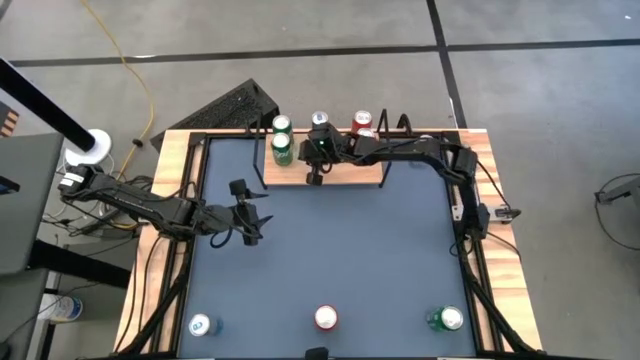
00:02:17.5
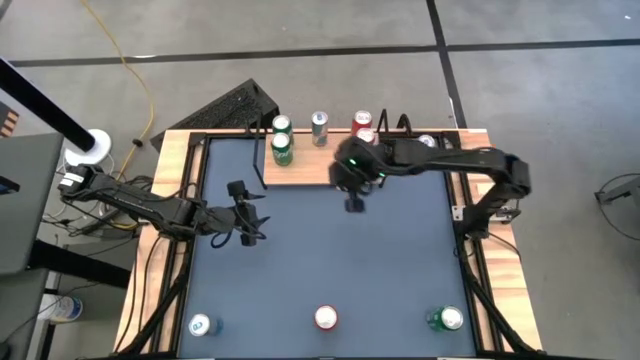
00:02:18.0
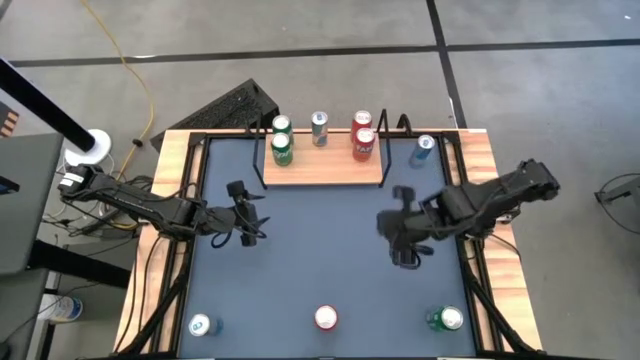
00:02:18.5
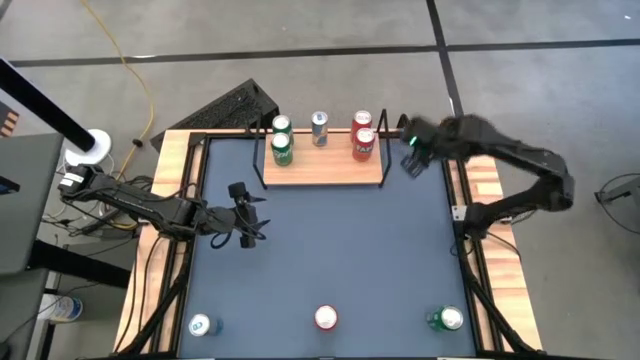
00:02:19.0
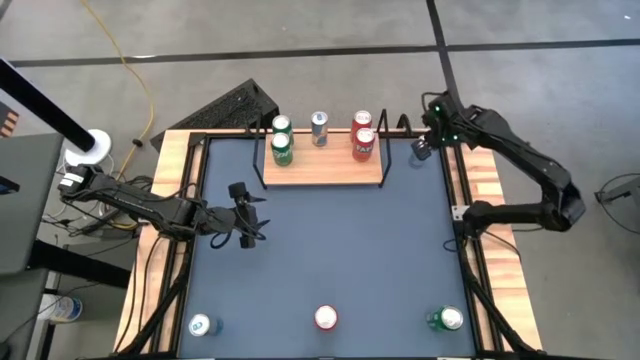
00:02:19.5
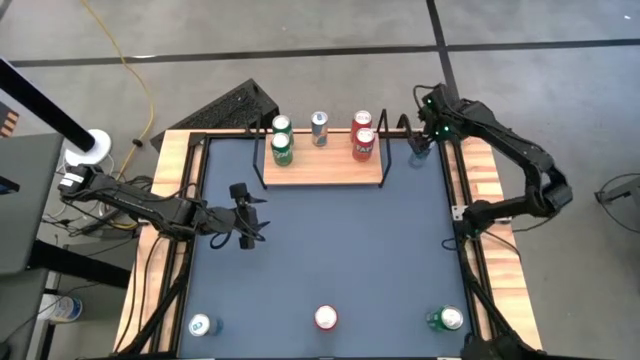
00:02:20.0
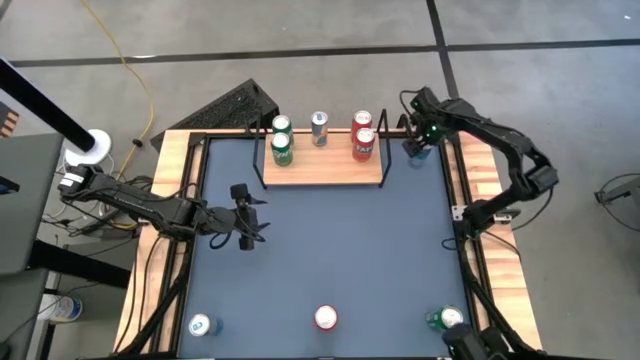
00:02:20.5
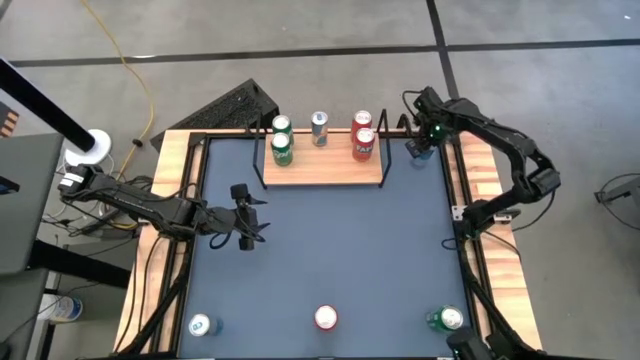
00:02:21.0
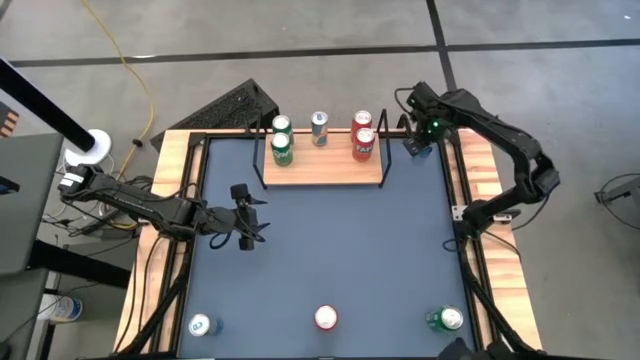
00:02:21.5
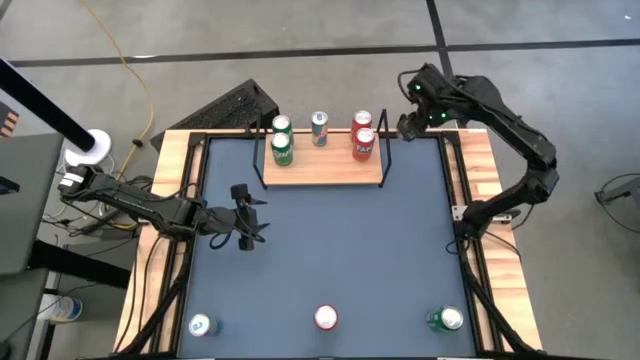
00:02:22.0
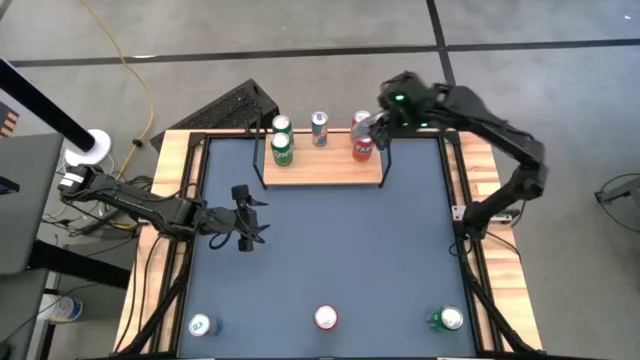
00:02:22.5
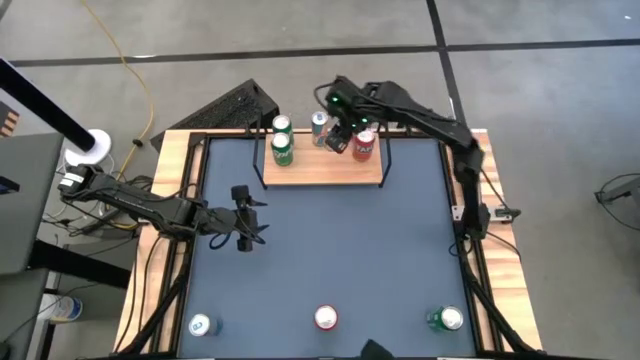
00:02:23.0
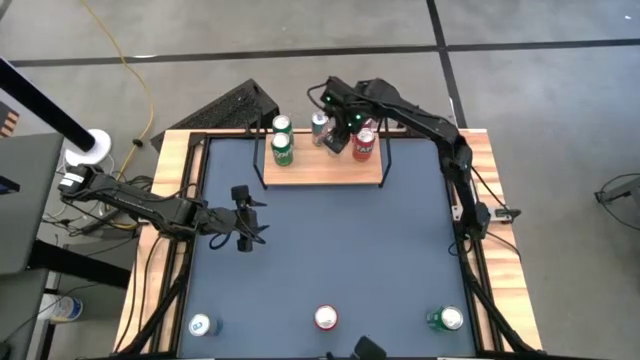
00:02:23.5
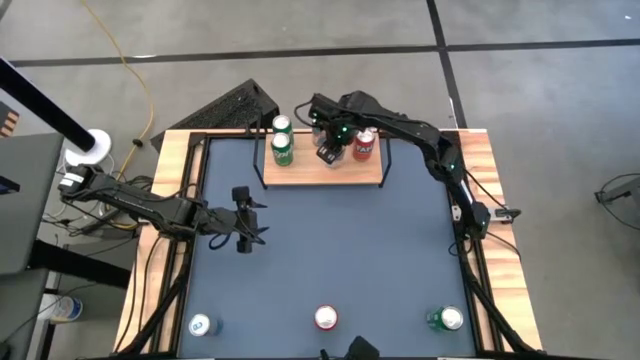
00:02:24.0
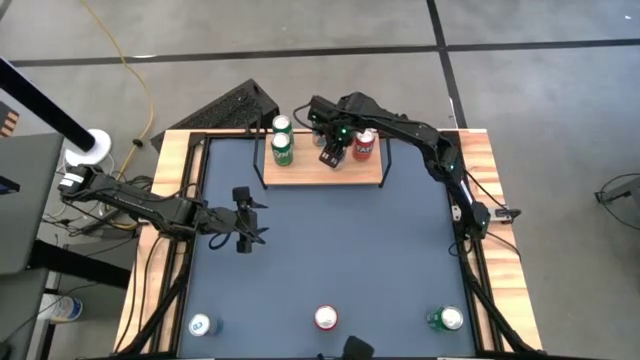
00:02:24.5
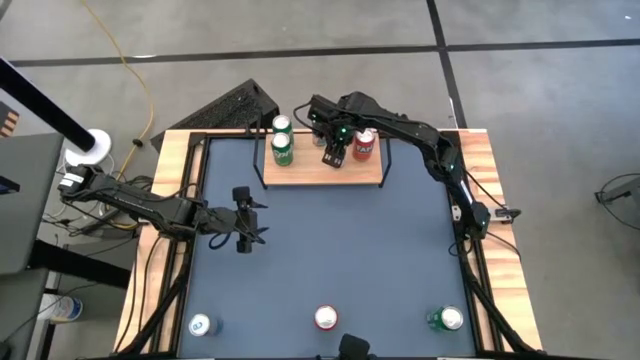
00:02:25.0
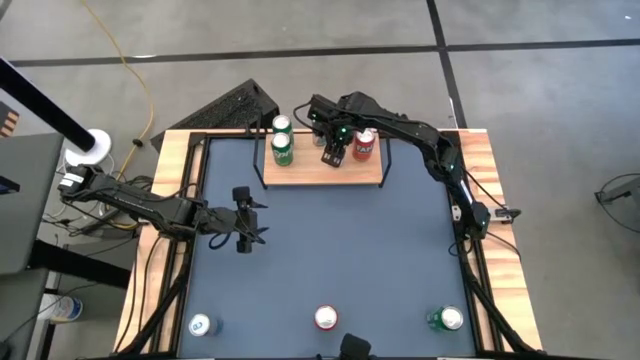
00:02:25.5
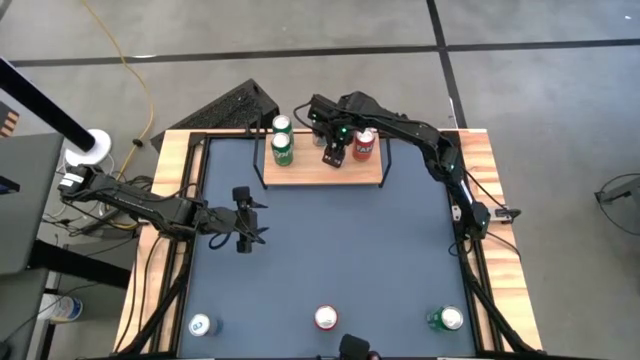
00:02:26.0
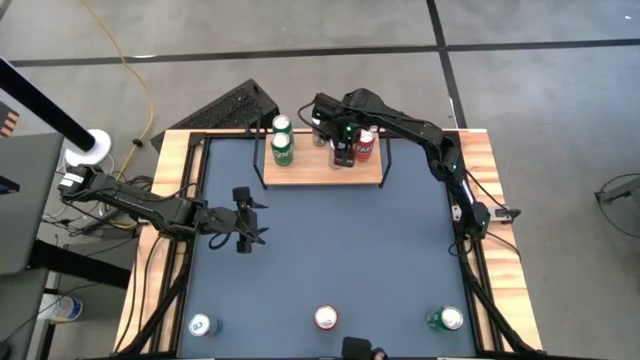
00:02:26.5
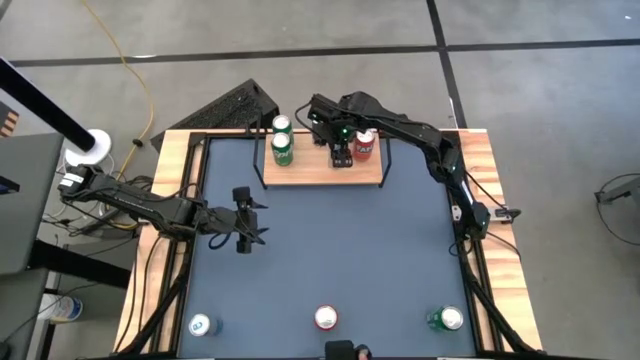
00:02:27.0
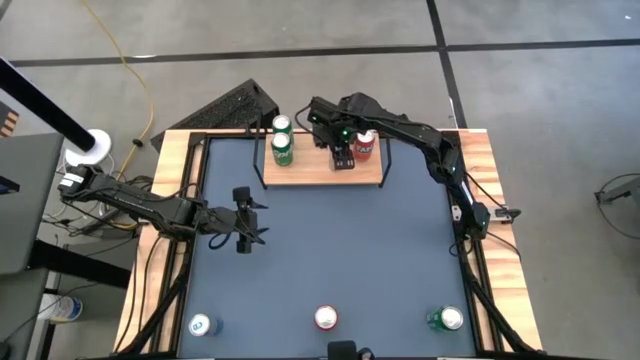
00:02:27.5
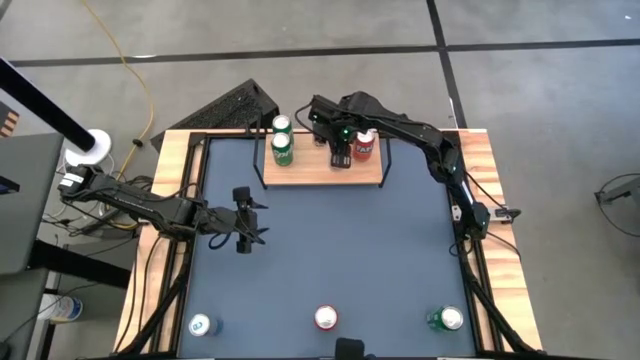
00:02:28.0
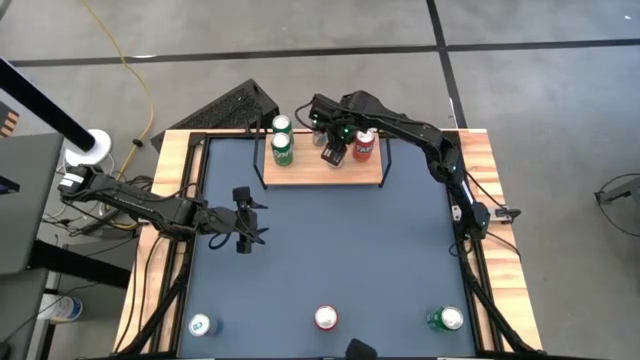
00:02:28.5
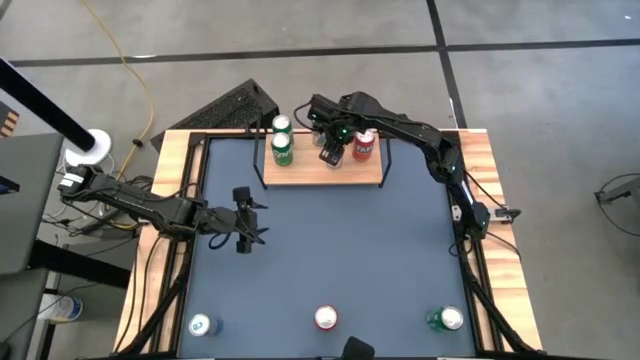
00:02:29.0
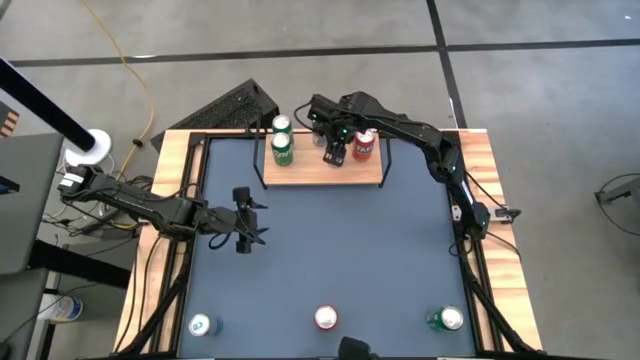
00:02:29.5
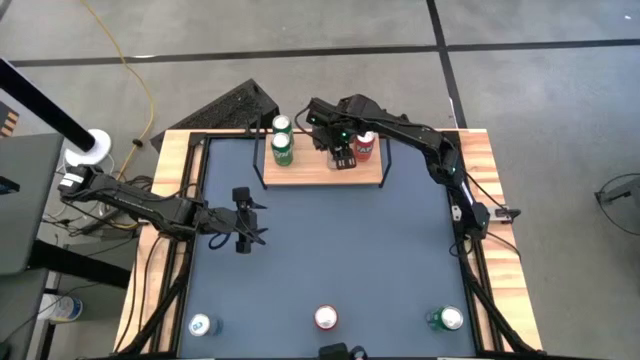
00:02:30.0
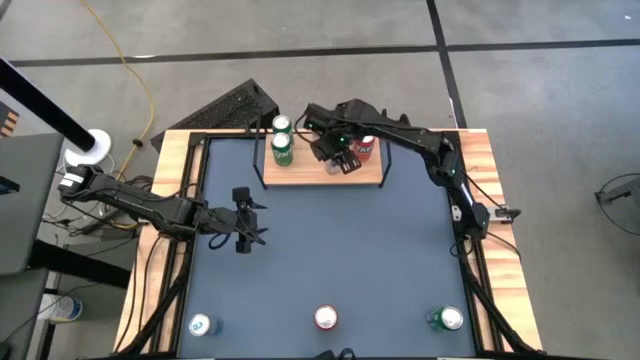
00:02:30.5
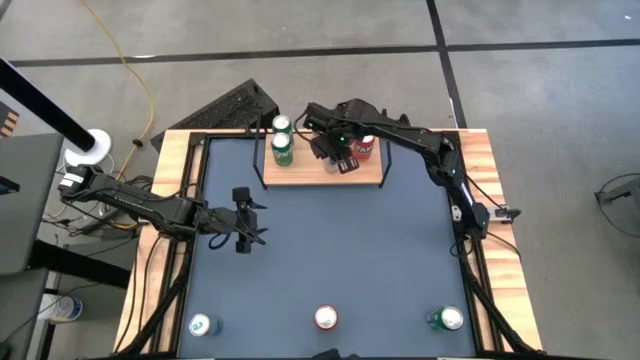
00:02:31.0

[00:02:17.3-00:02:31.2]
Task: Place canned beverage on shelf
Put the top blue soda can on the shelf aligned with the other blue soda can

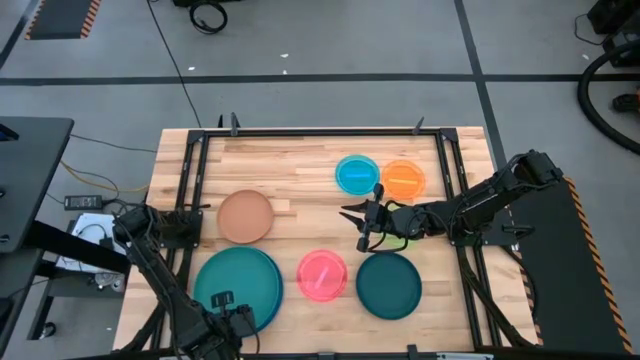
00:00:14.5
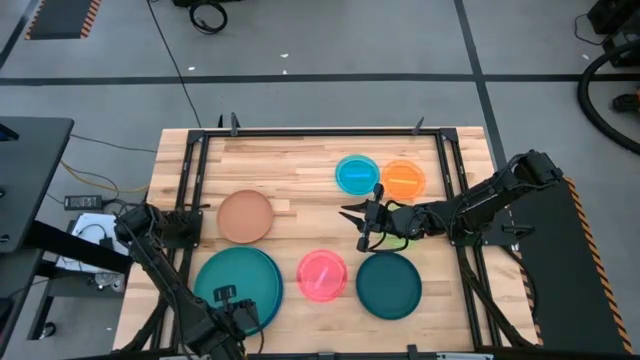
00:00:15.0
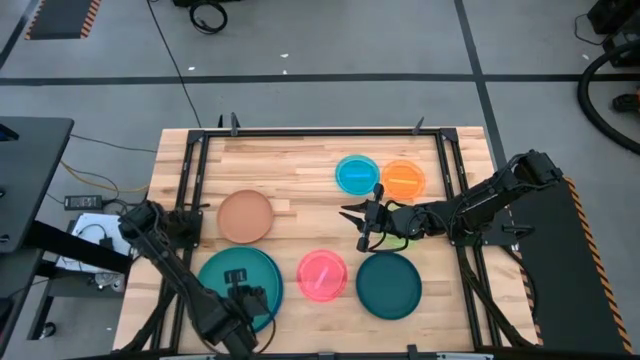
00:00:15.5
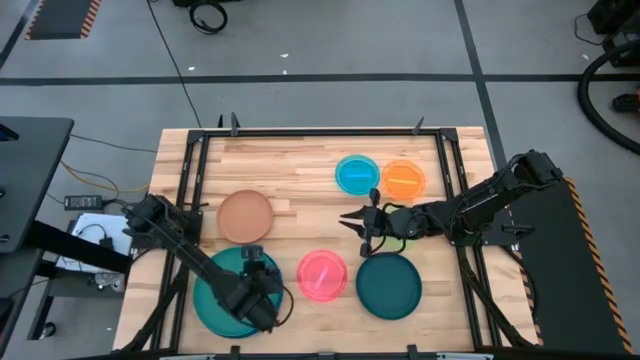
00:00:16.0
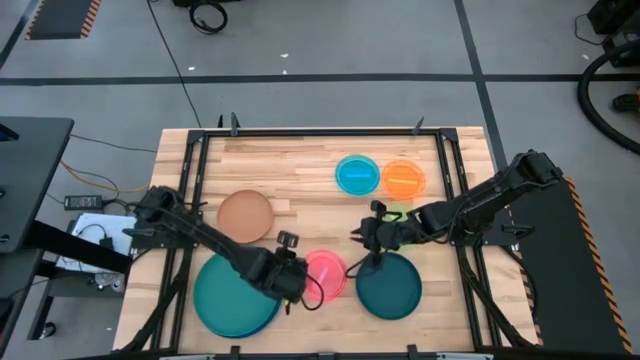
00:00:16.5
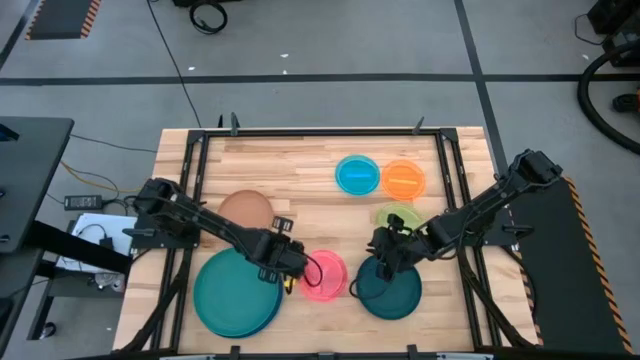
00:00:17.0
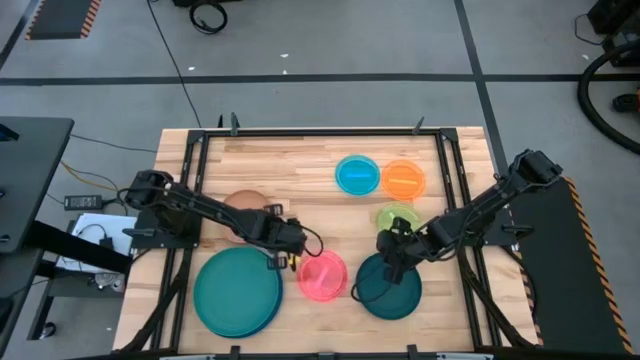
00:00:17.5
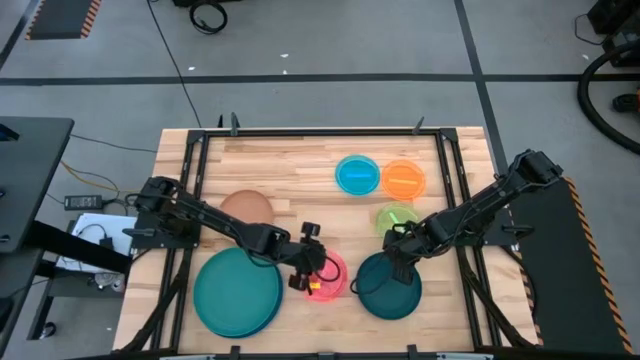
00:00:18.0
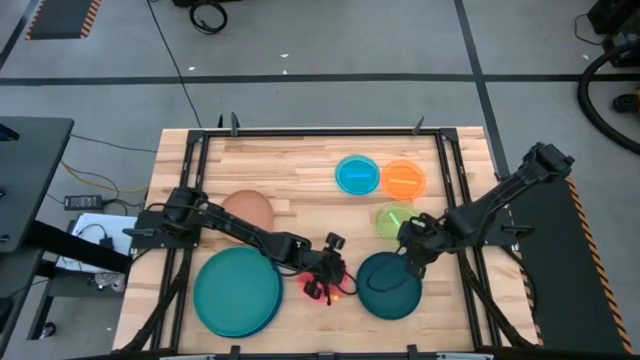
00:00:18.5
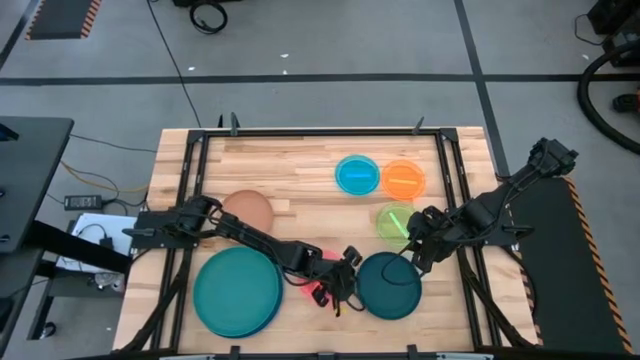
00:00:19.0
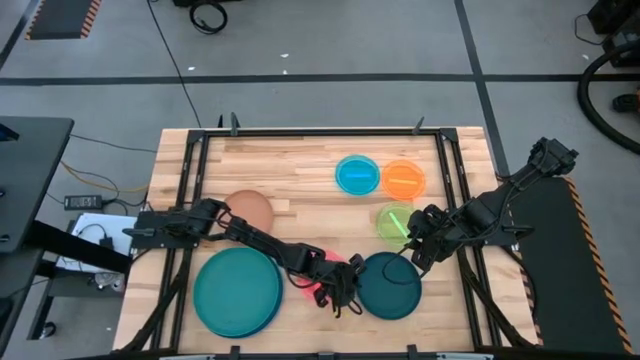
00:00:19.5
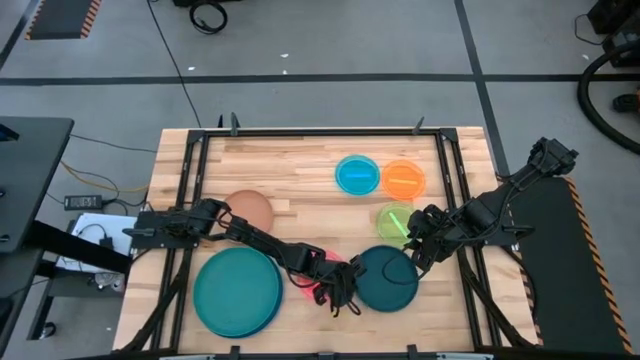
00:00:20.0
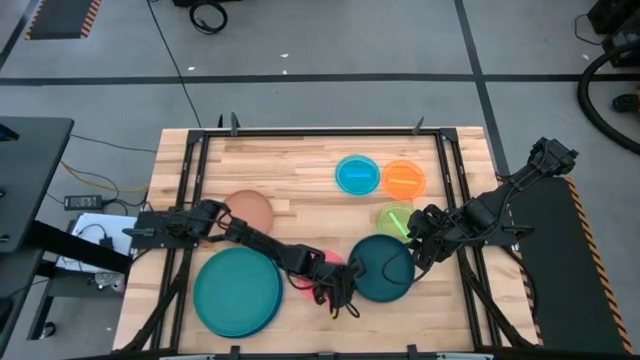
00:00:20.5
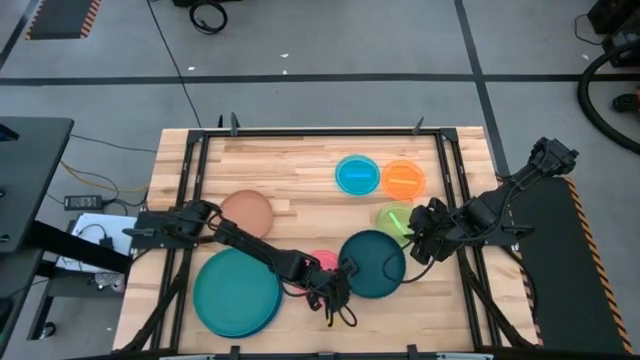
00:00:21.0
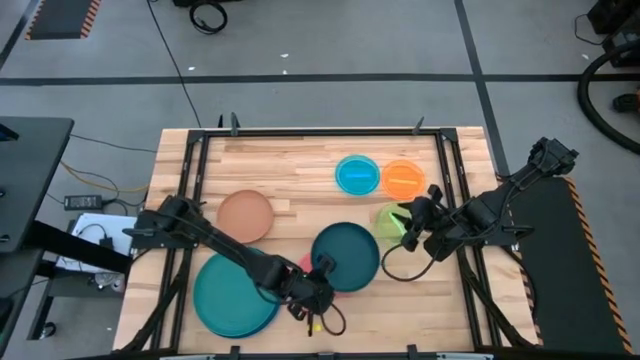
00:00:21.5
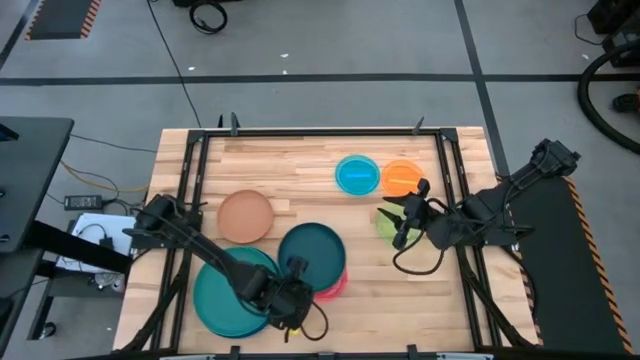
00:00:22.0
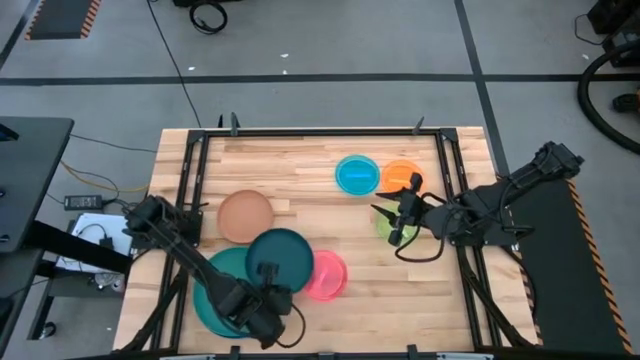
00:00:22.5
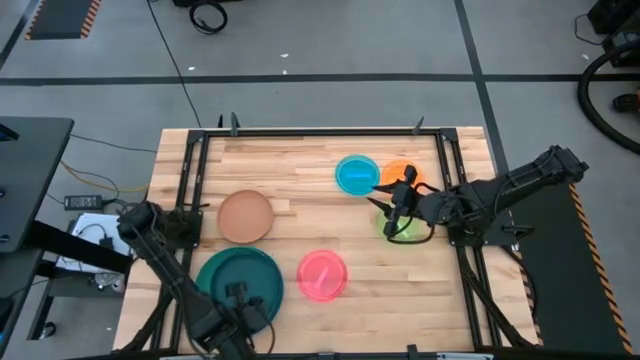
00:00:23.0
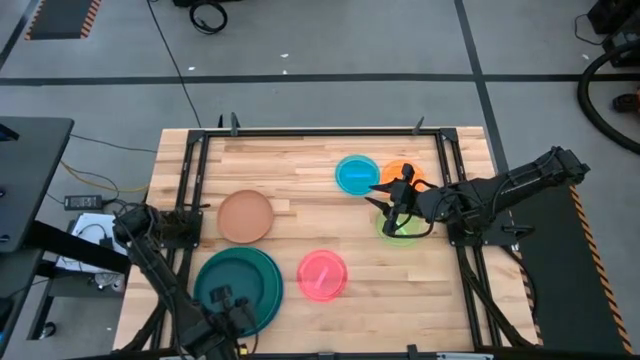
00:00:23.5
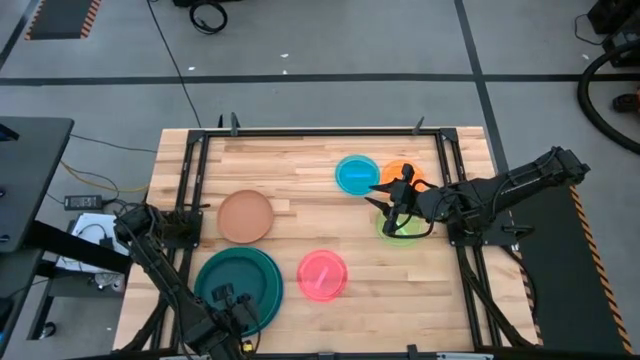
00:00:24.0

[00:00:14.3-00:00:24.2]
Task: Stack plastic plates
Stack the dark blue plate on top of the green plate
